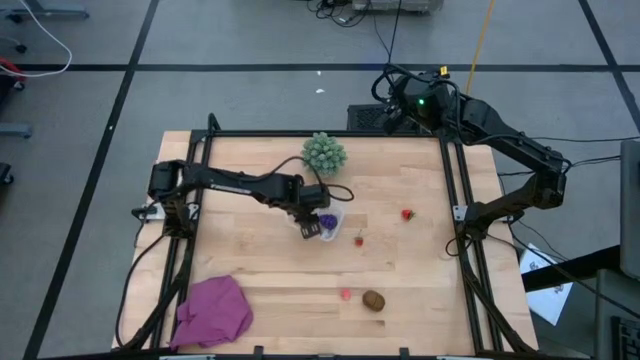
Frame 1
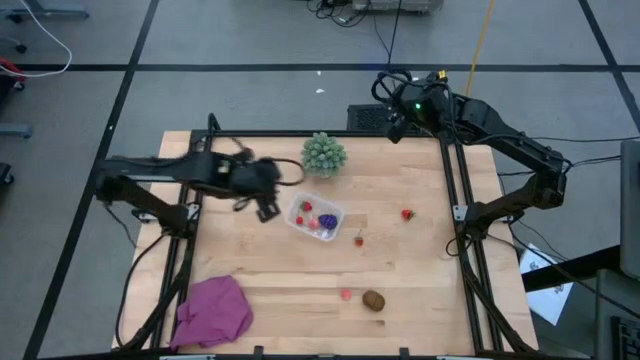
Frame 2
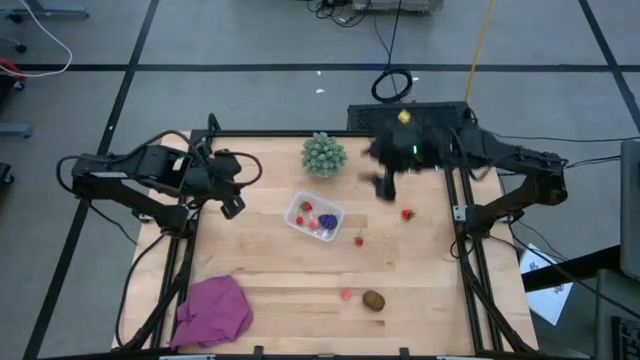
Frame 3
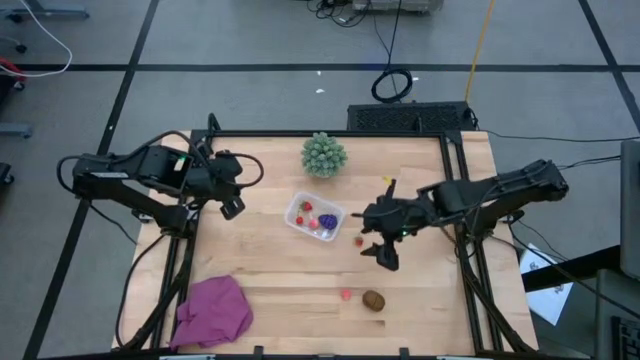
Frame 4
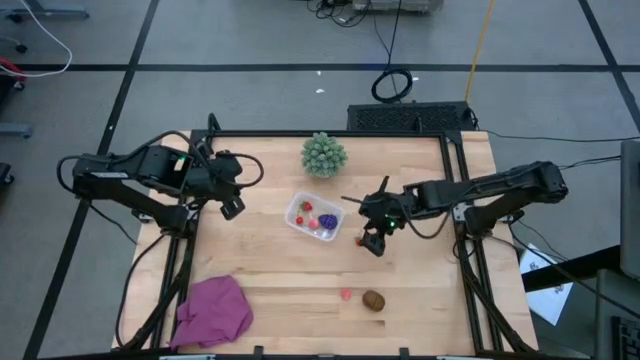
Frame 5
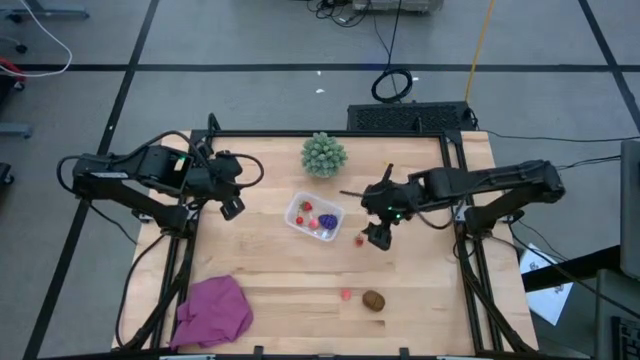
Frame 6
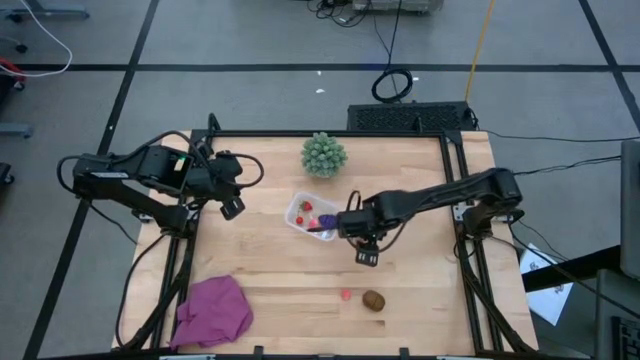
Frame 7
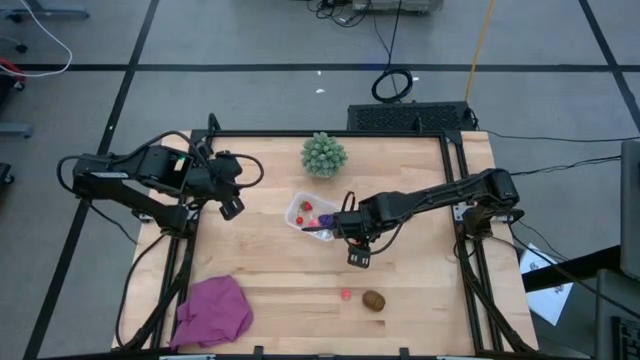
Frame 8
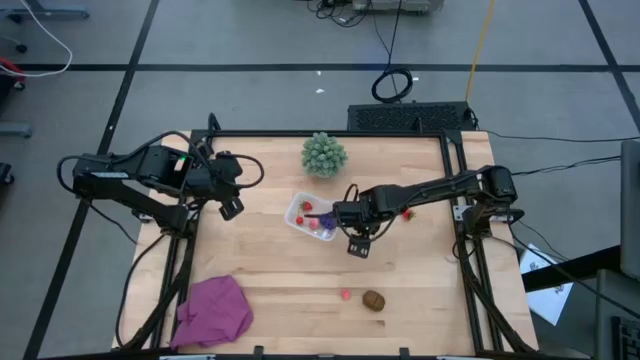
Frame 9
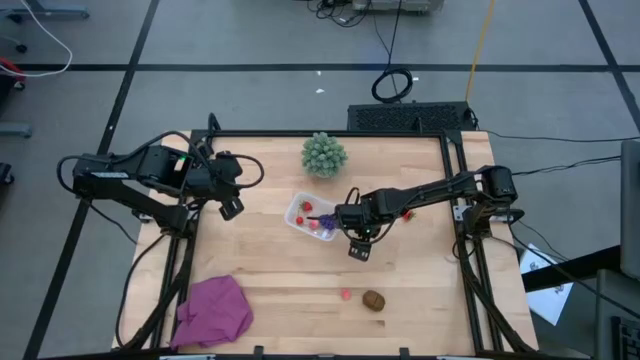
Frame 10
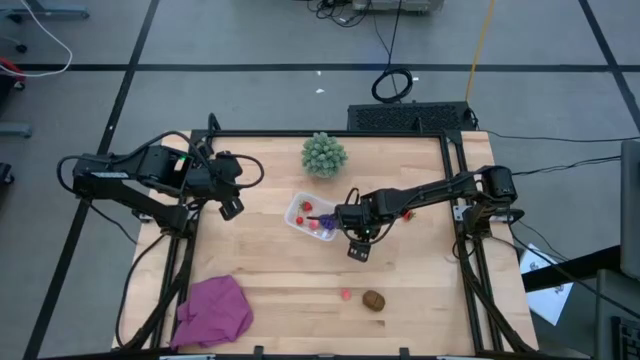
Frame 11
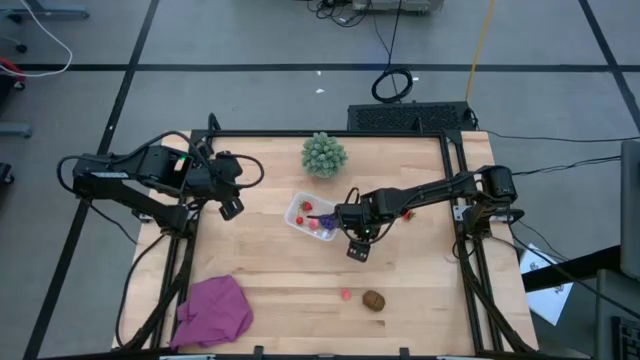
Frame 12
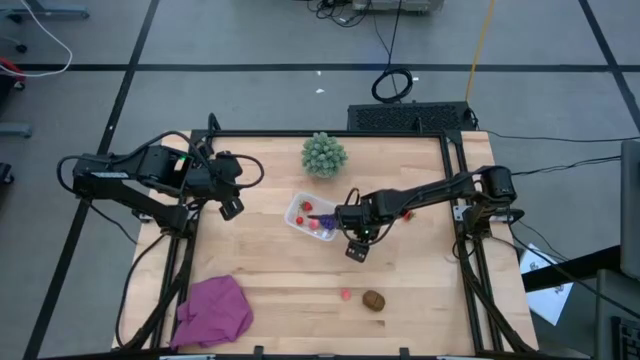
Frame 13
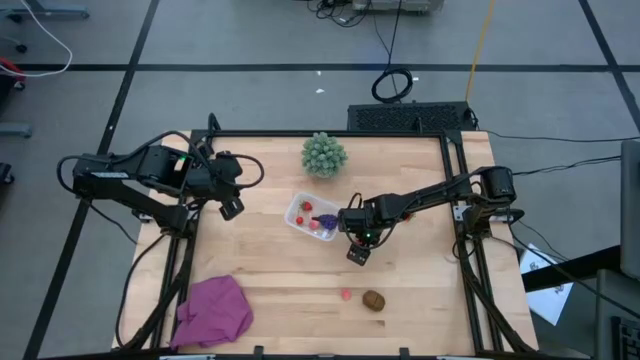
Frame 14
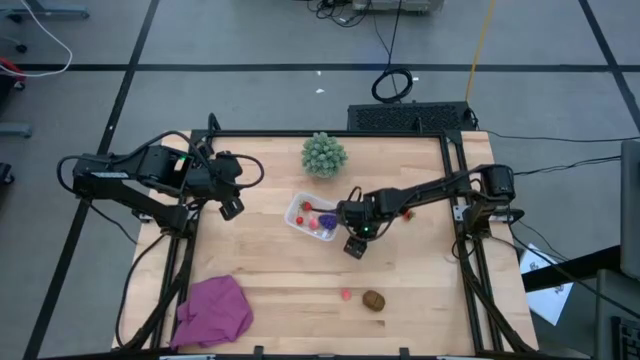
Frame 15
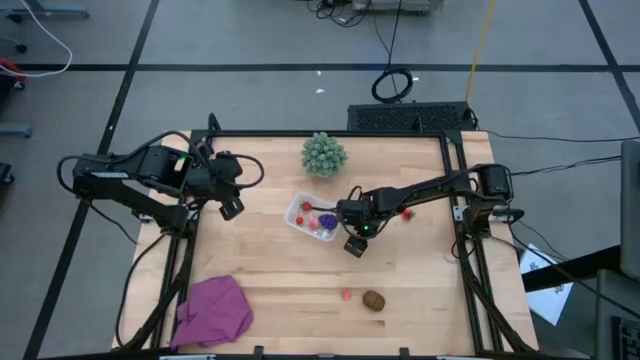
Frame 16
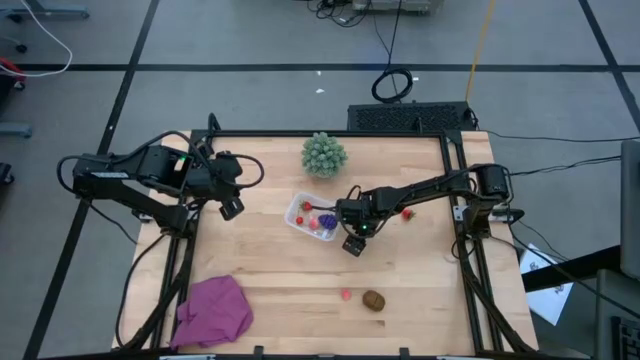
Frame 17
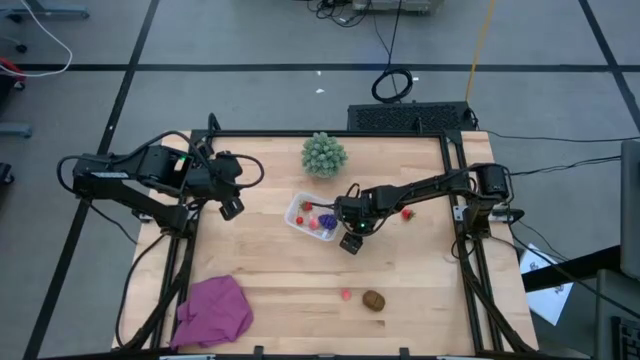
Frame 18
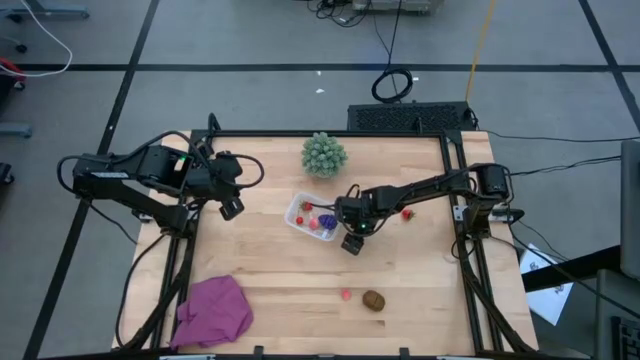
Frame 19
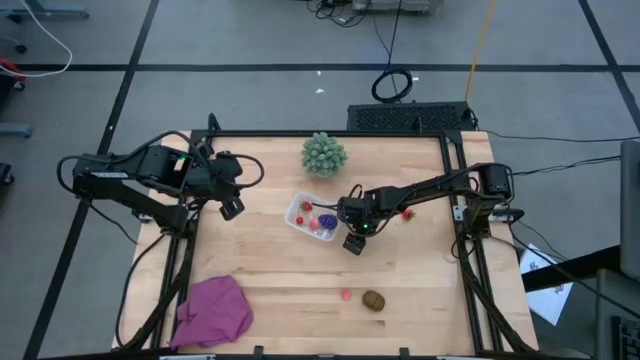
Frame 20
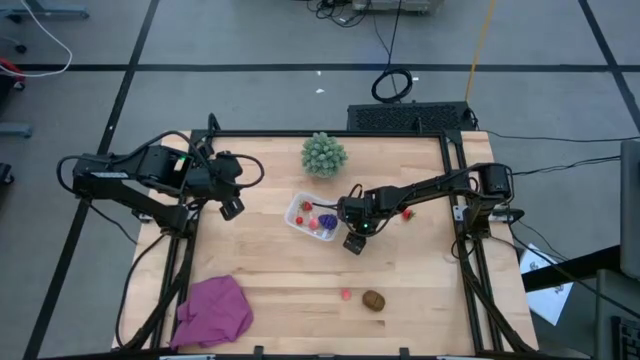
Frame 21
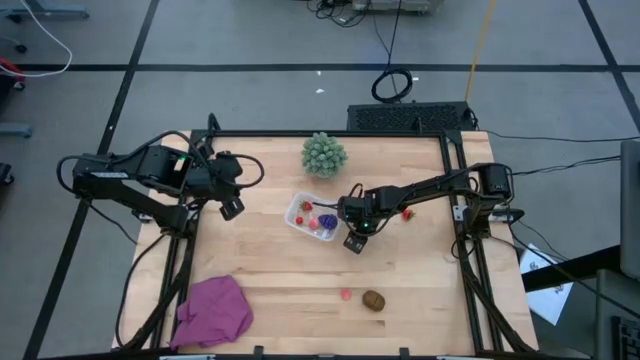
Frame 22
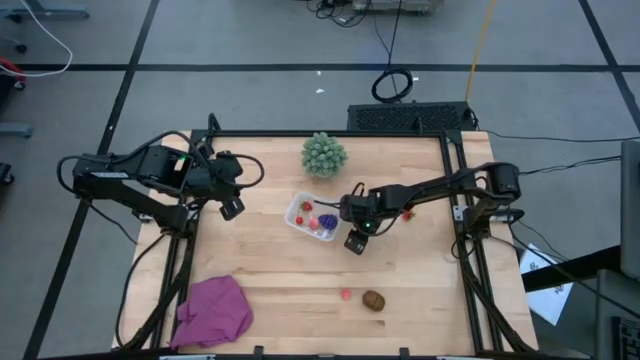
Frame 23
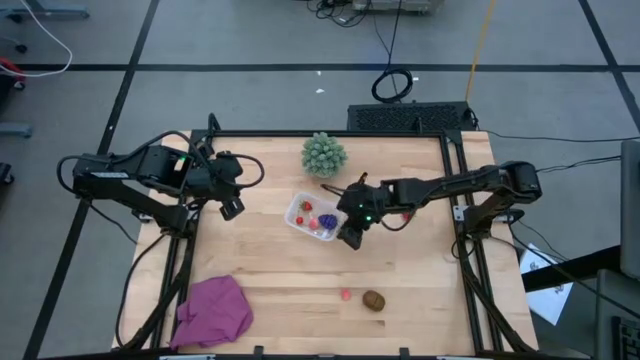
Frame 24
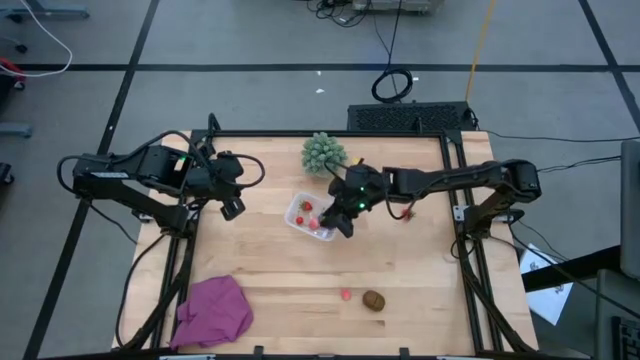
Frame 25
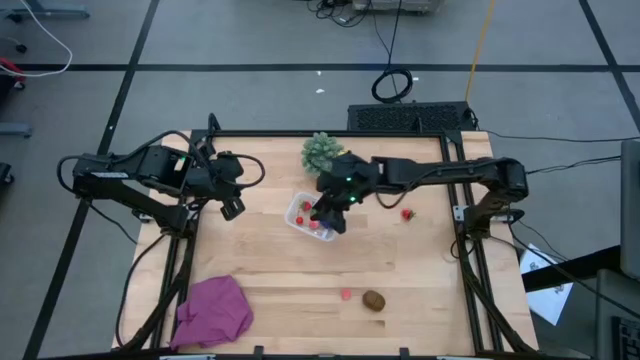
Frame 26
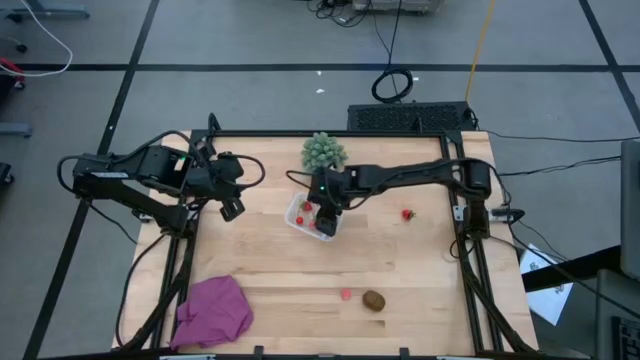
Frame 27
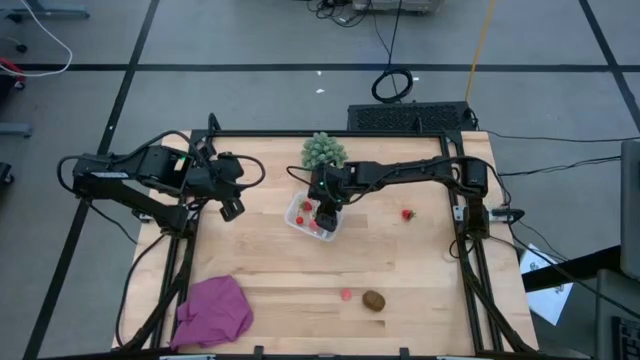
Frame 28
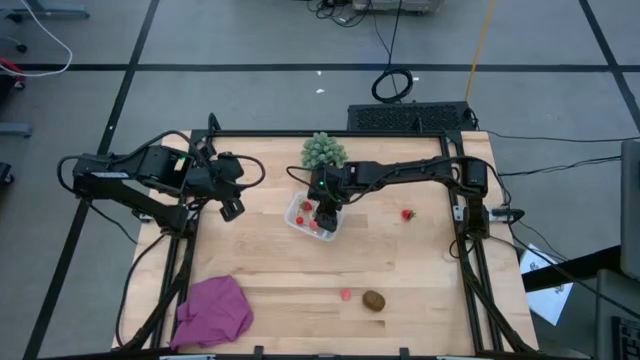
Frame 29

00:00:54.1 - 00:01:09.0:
Task: Pick and placing Produce into tupperware
Put the left strawberry into the transparent bin

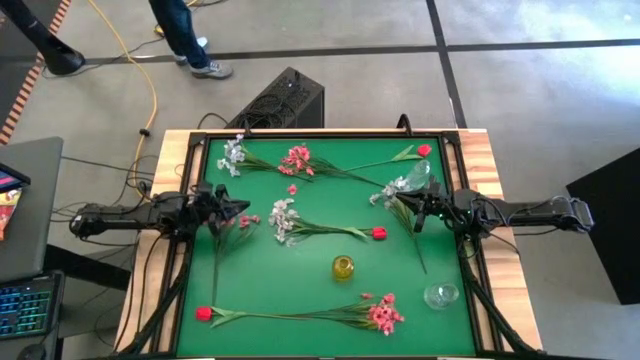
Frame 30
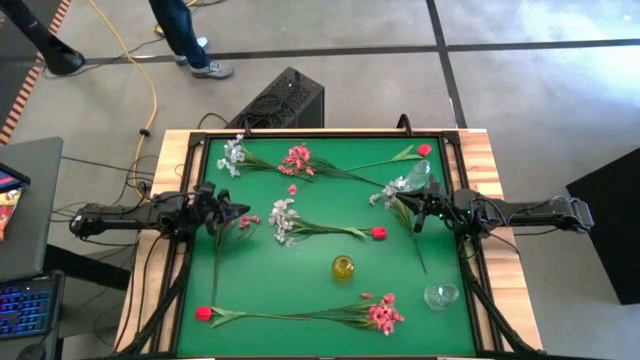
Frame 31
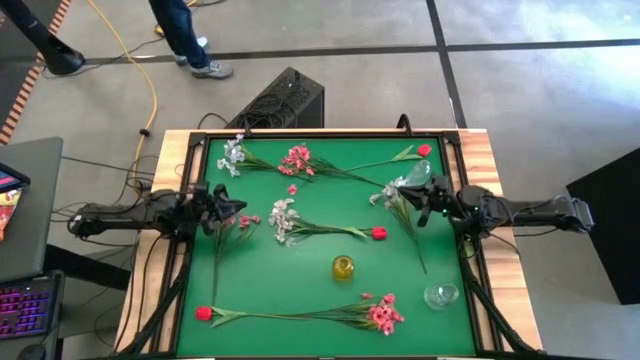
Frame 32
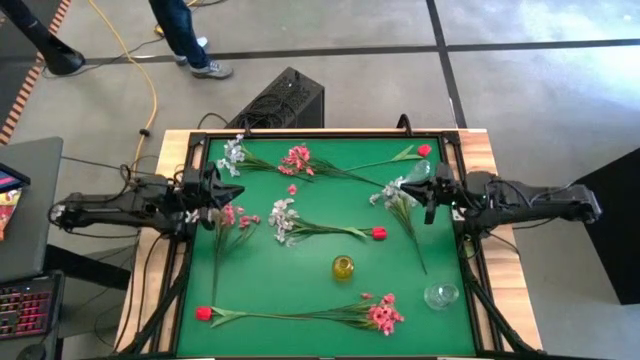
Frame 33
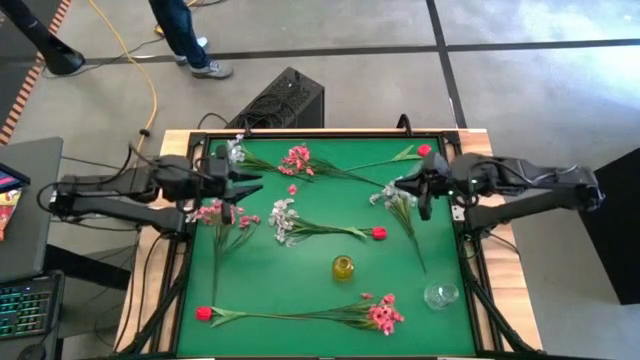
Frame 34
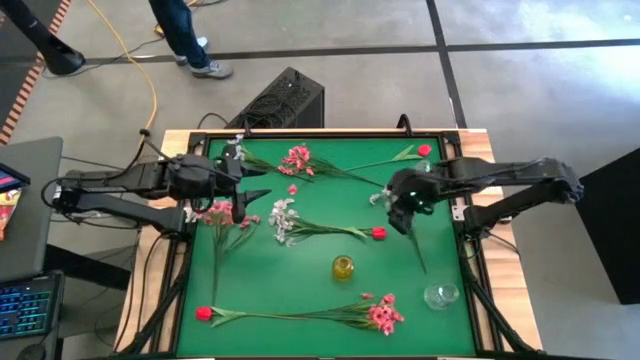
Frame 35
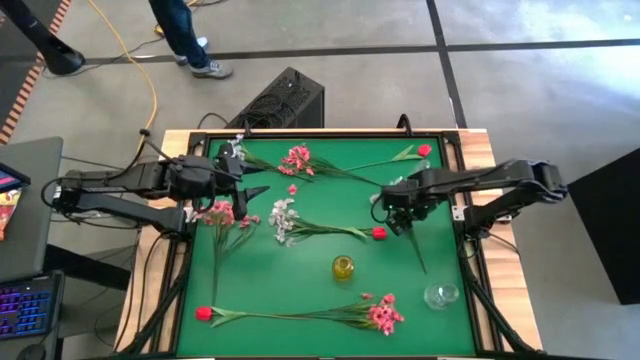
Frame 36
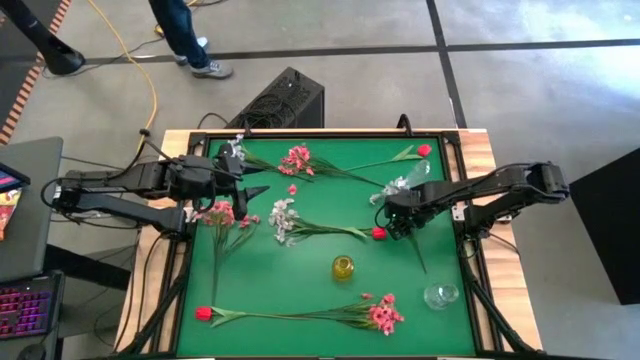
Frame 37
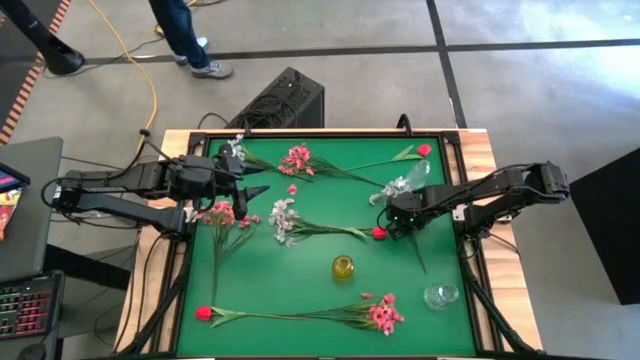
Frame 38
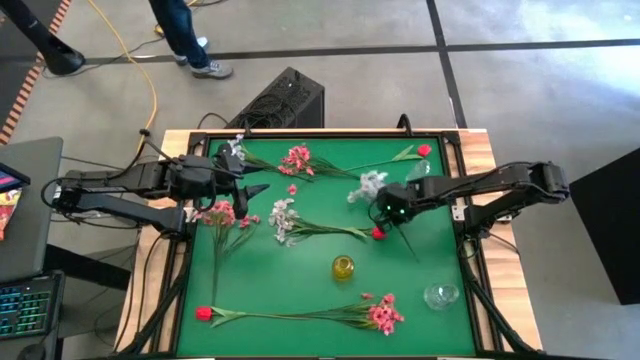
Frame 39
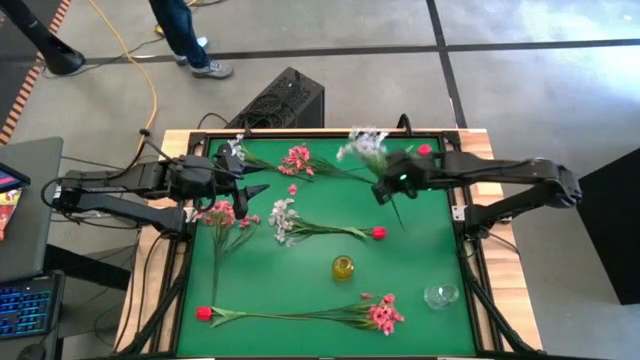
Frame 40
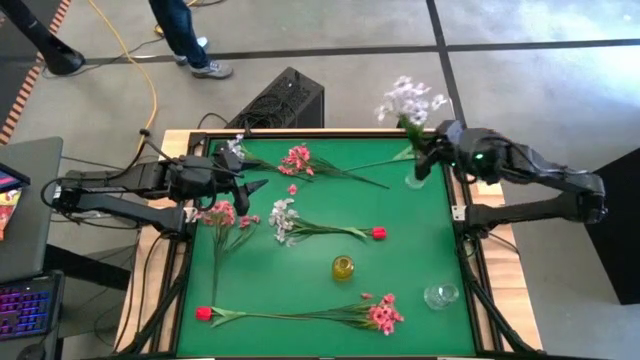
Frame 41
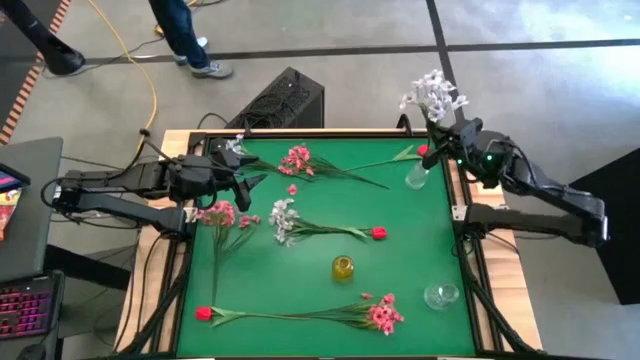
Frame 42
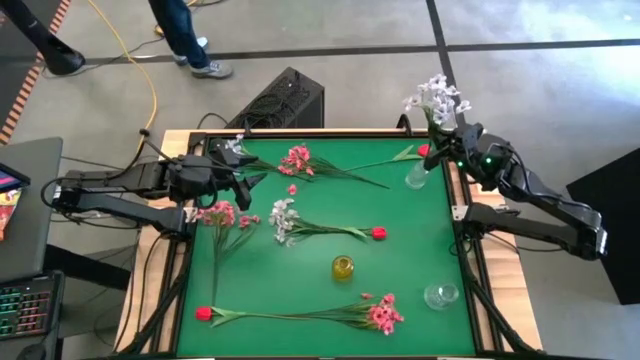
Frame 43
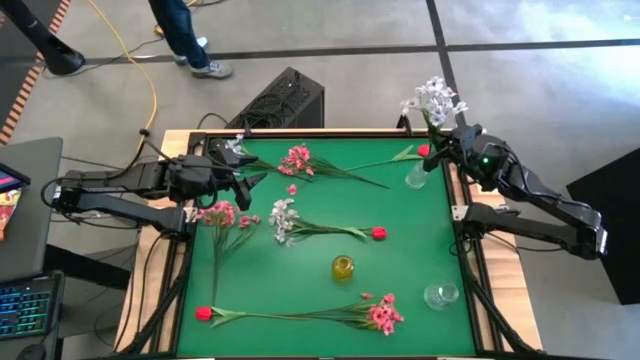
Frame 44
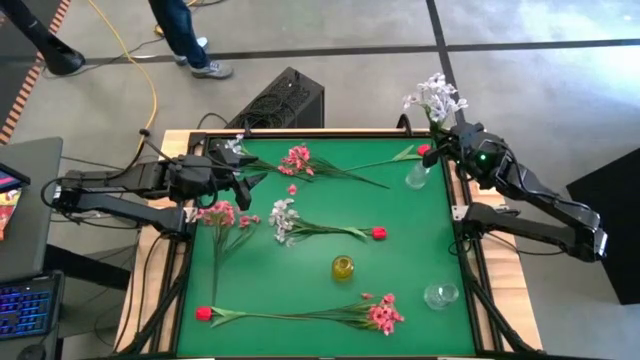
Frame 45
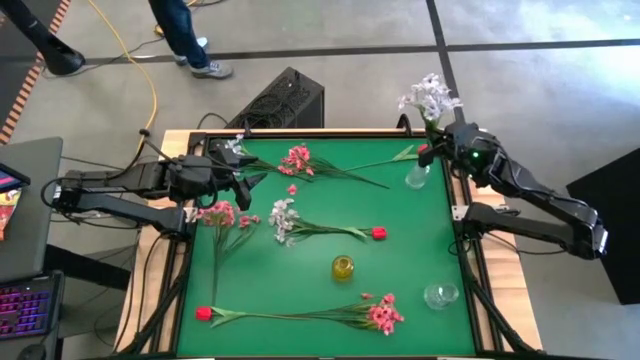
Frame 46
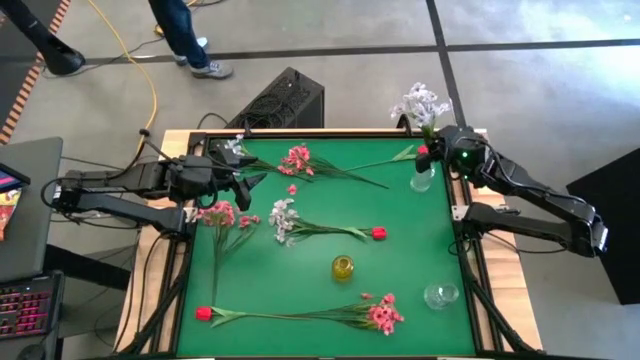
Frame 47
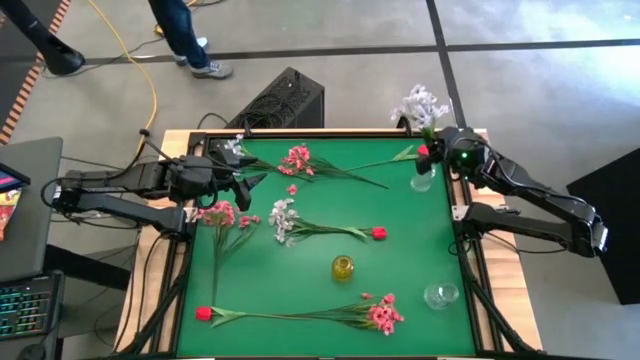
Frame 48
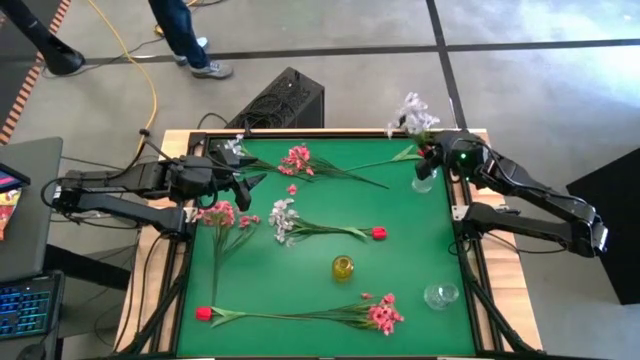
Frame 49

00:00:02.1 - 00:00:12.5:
Task: Sort flowers into vase by color
Put the right white flowers into the top transparent vase
